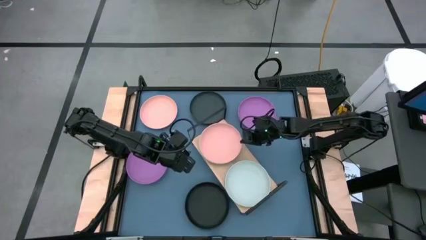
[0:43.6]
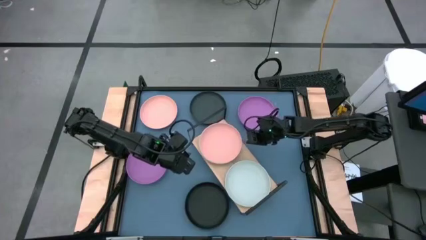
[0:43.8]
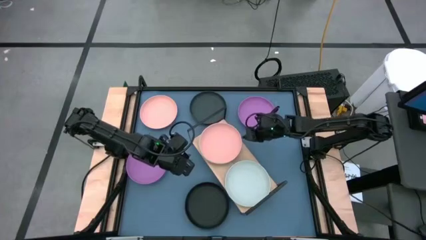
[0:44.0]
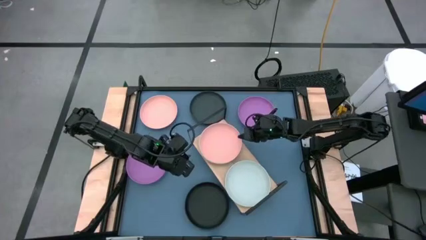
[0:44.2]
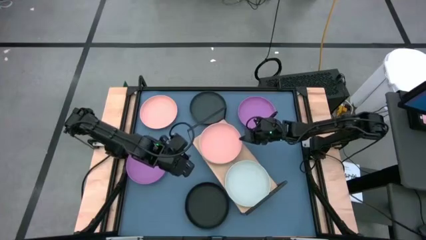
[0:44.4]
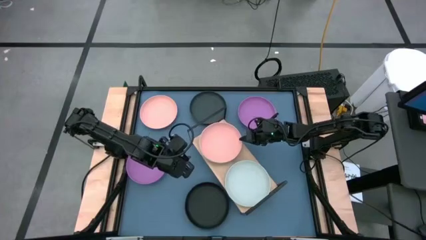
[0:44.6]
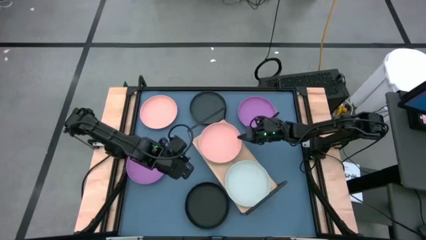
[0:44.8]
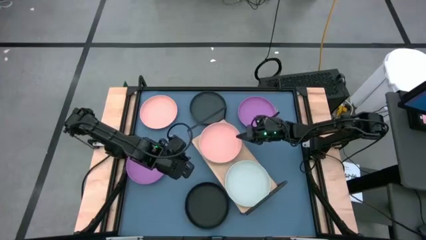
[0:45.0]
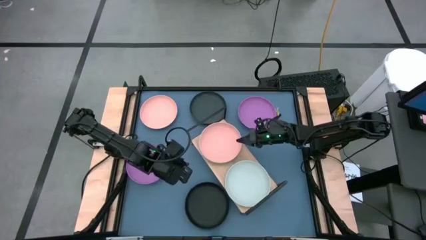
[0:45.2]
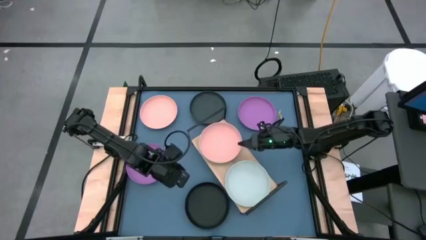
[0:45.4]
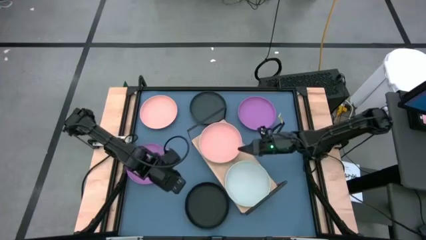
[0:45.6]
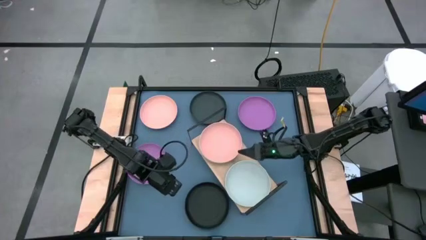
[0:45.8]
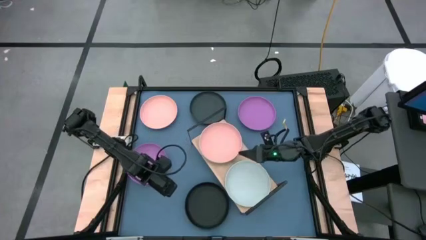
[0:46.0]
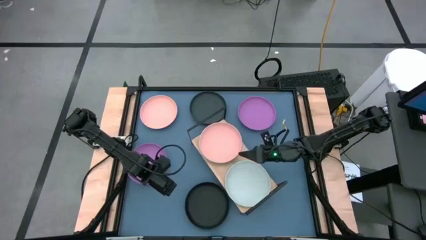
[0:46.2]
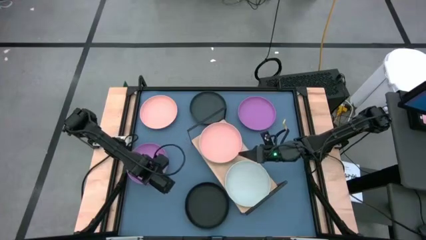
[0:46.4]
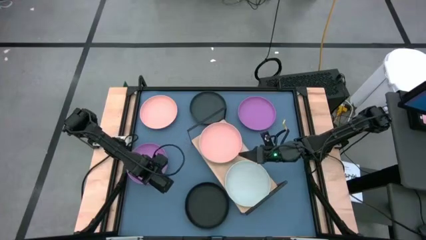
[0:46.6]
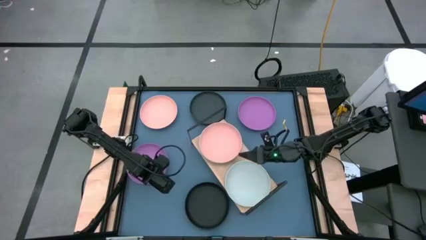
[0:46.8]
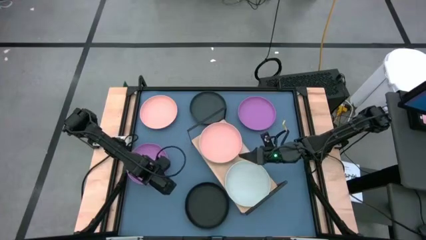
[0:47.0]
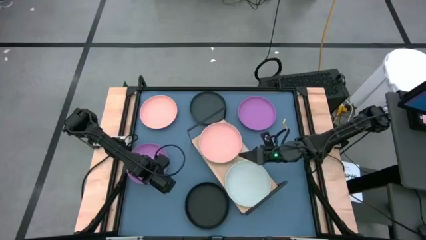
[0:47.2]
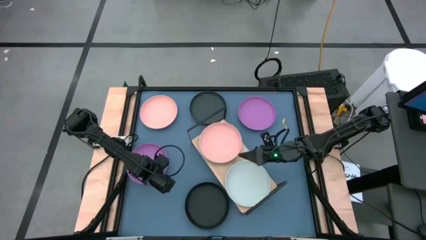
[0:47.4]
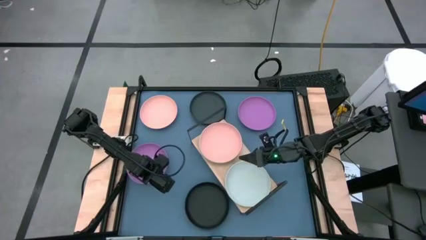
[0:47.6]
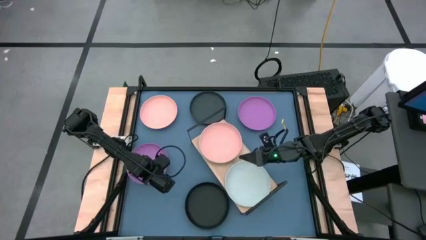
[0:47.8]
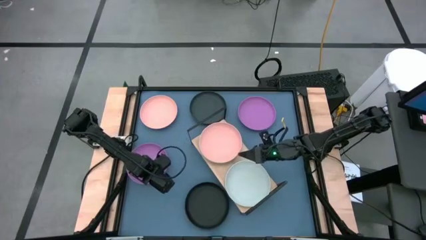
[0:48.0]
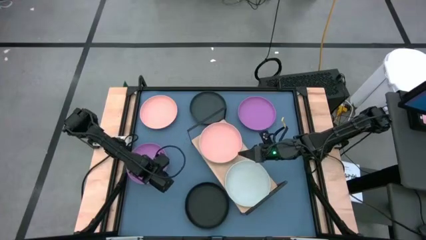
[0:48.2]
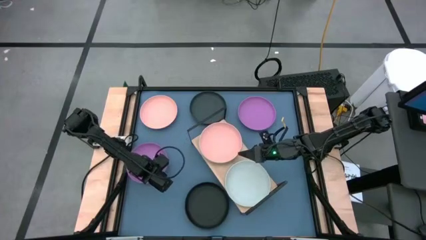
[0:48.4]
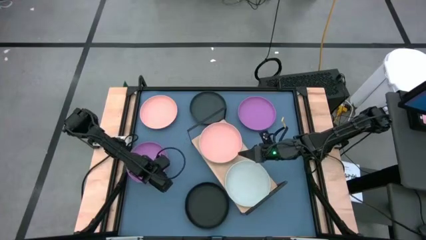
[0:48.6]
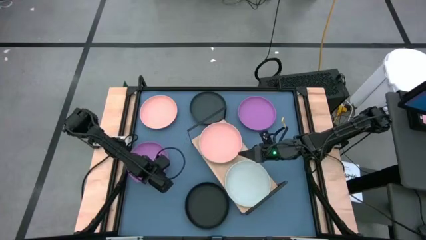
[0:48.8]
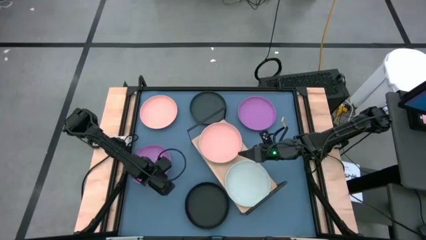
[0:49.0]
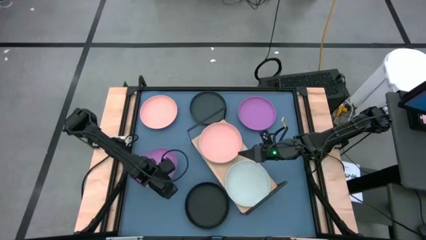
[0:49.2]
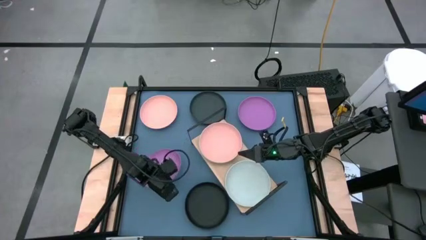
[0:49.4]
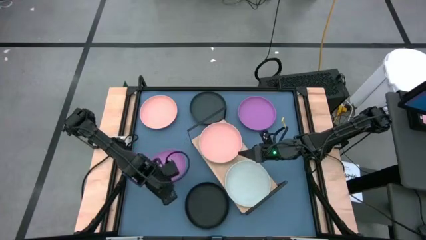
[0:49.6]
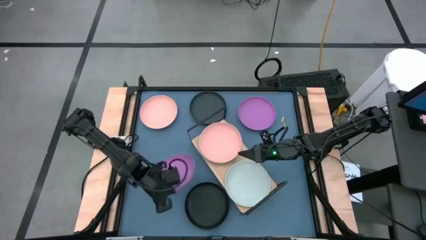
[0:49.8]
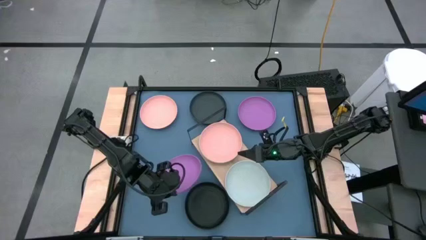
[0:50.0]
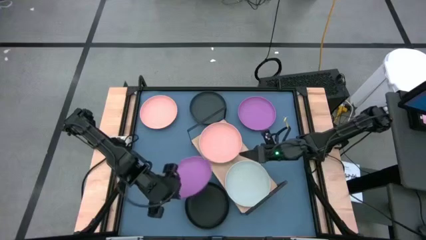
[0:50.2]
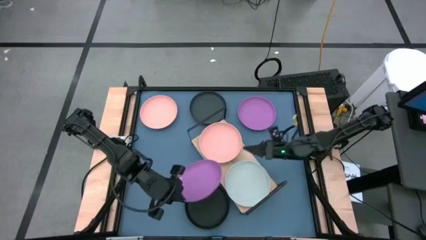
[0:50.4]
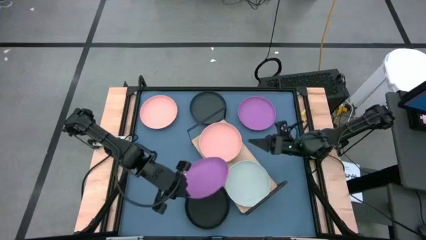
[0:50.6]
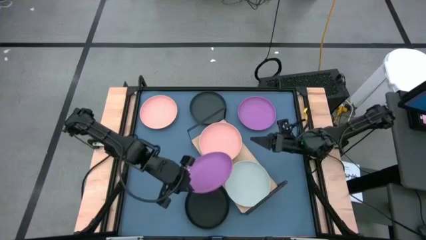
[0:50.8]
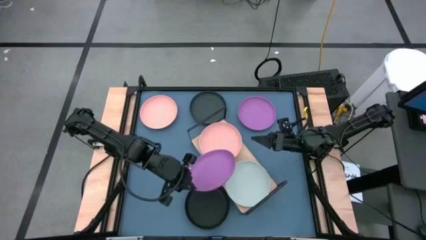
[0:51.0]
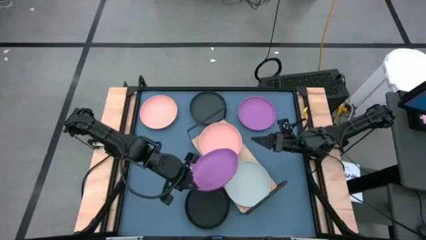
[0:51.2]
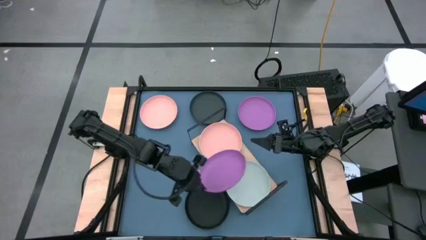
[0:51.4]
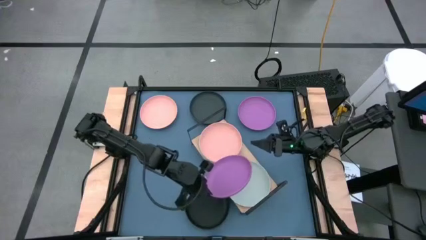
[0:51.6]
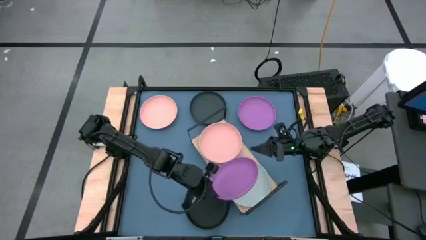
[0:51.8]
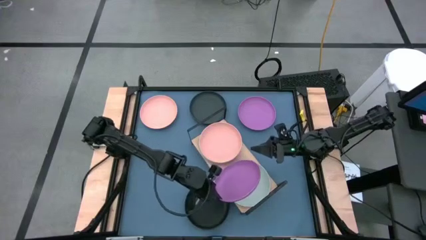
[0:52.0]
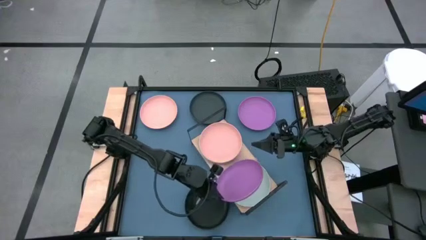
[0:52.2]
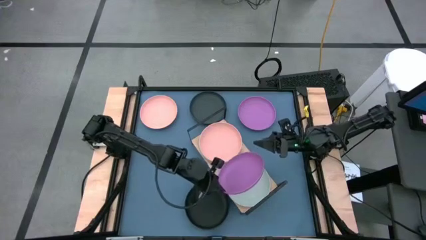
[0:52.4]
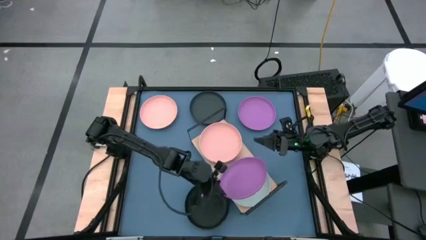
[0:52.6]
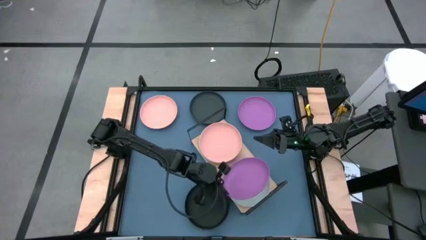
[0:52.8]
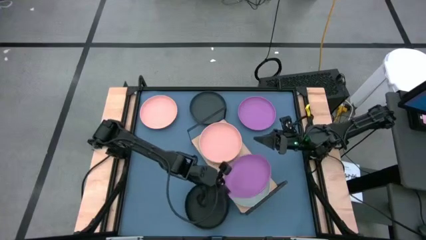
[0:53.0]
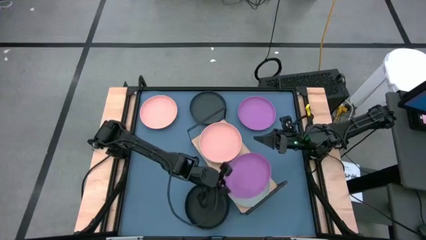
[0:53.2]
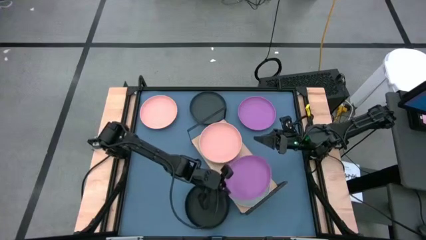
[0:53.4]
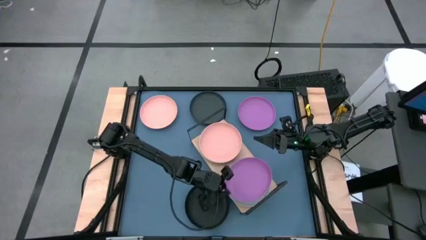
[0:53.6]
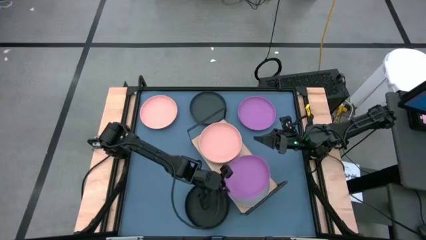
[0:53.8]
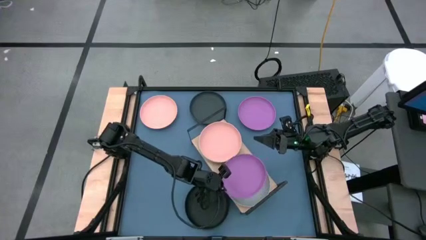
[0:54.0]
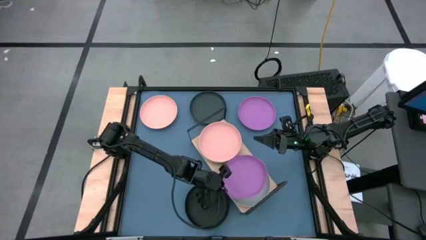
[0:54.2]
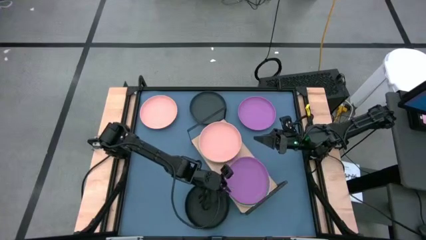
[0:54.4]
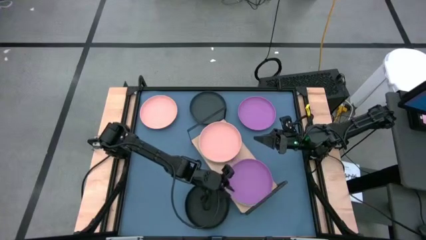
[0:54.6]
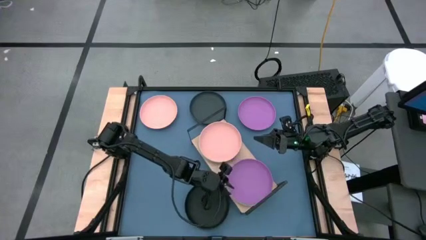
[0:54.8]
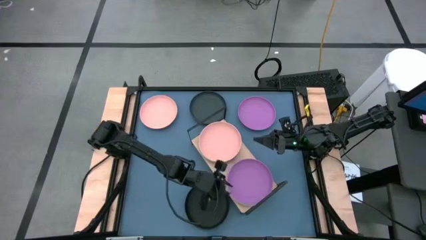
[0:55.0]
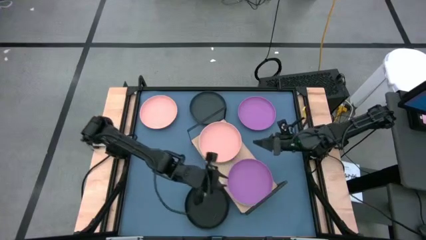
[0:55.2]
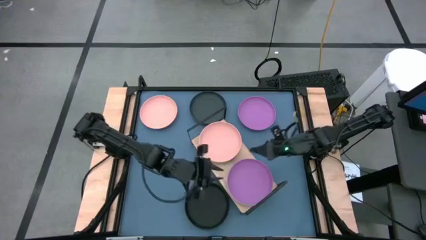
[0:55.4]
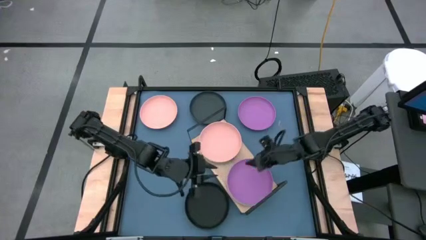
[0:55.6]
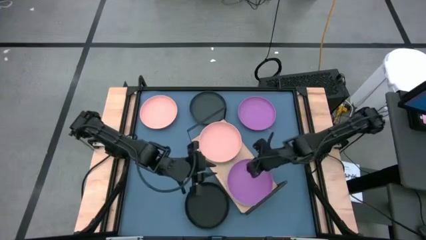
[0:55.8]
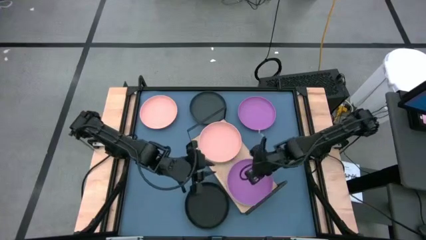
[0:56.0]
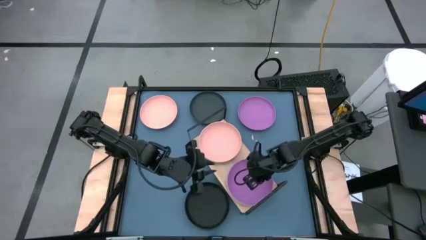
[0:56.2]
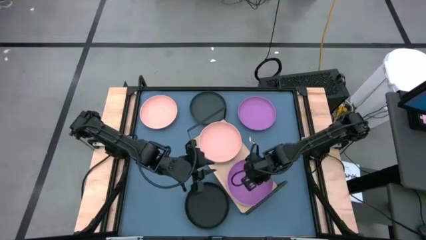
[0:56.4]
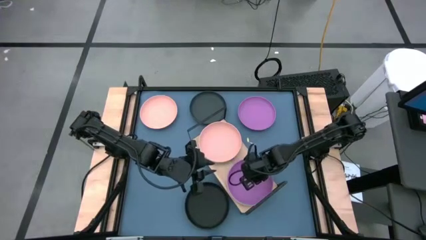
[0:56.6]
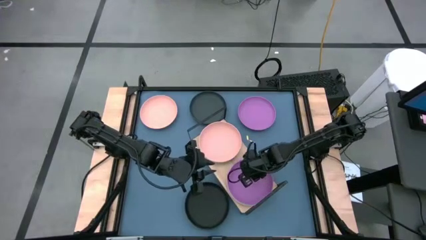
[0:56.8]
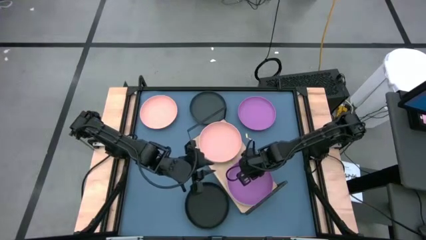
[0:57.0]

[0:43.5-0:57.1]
Task: Place and stack plates onto a shelf
Stack the left purple plate on top of the light blue plate on the shelf

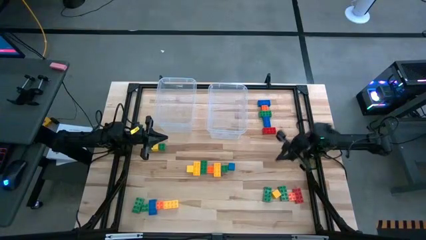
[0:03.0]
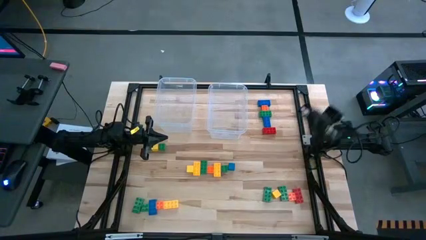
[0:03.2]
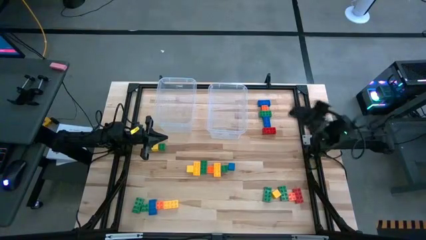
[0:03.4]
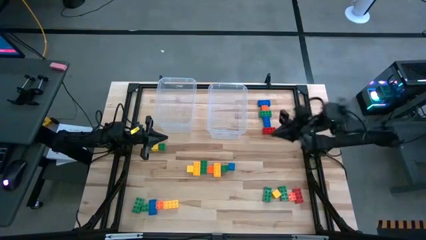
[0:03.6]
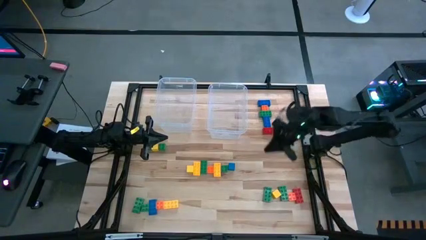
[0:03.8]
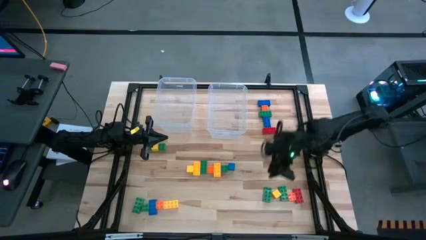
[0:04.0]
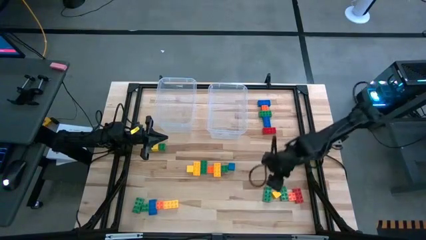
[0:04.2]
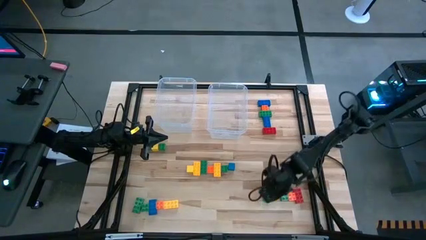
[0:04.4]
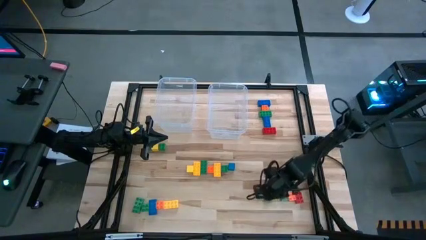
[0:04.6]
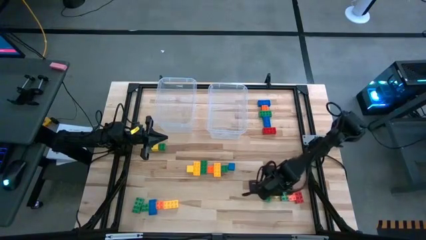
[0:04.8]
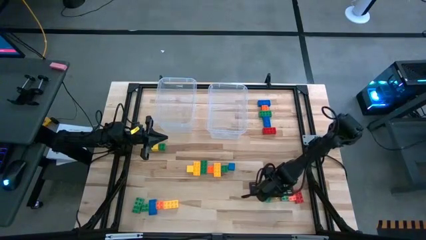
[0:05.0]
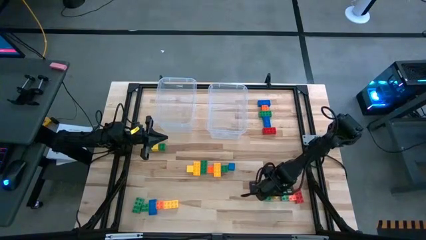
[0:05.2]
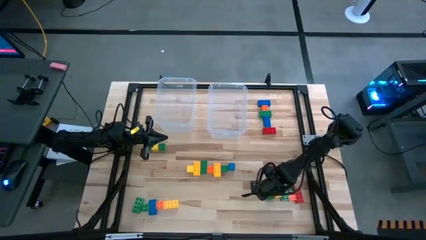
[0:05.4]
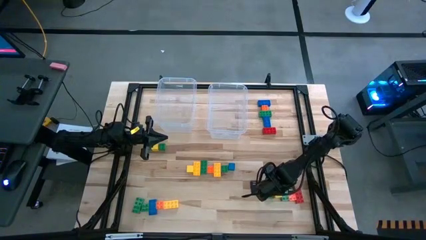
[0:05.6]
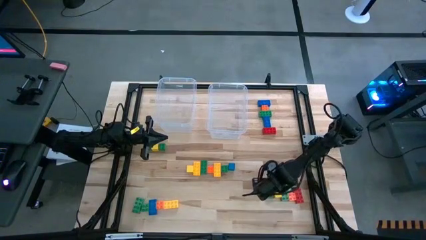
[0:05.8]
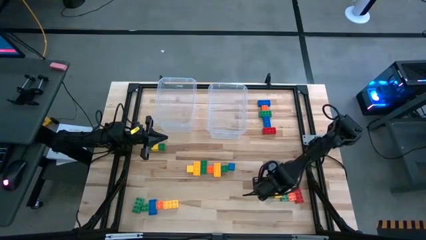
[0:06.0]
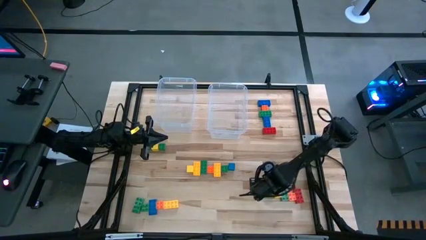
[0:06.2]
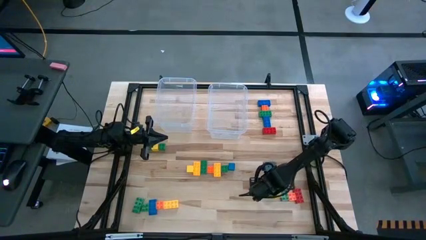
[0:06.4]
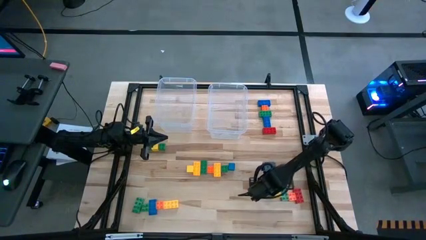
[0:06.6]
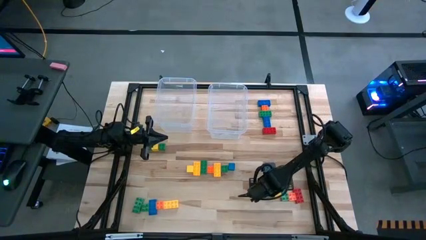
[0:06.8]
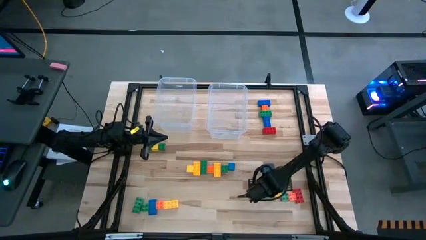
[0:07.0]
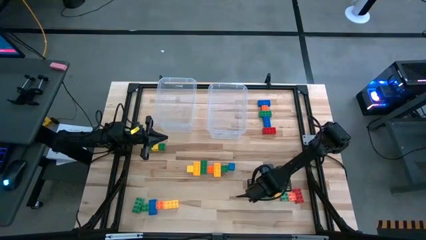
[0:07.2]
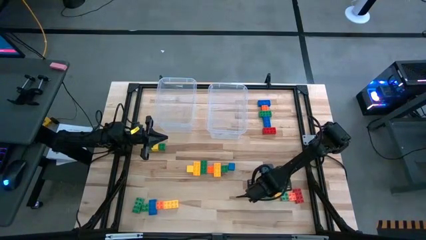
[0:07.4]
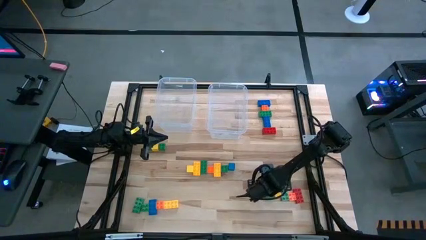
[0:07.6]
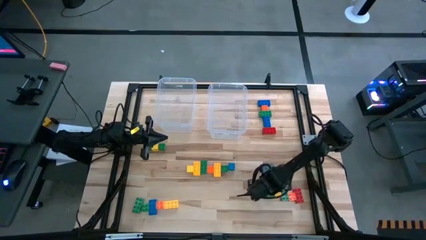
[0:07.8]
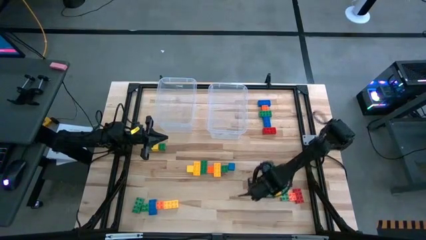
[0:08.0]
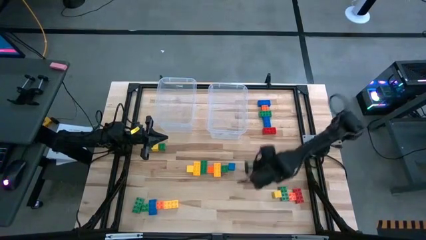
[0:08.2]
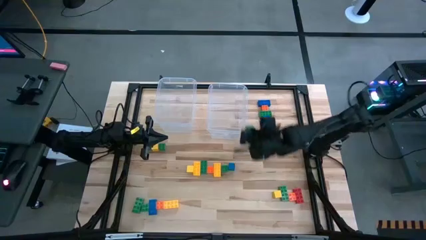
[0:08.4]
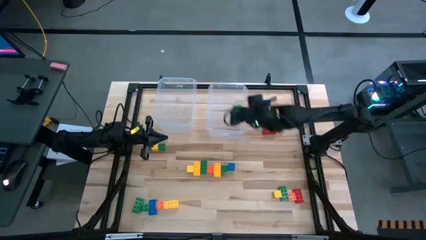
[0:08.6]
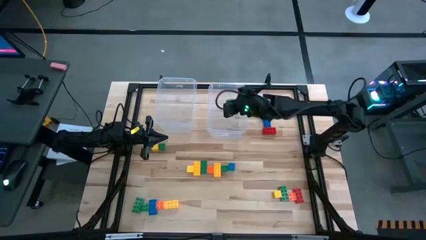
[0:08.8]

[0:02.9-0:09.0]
Task: Sort blocks by size
Put the green big game piece into the right transparent bin
